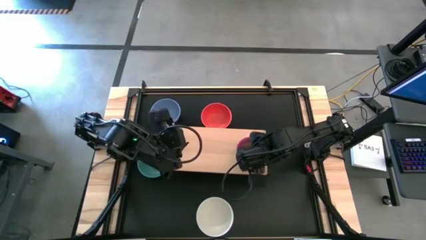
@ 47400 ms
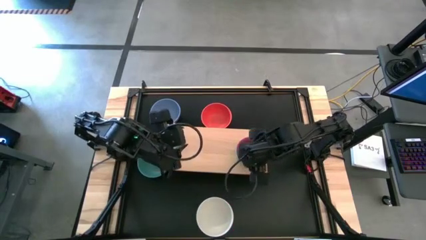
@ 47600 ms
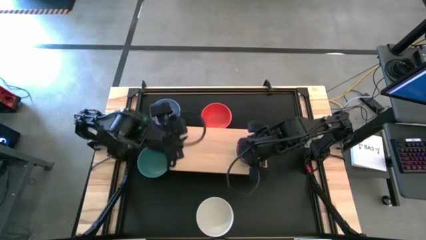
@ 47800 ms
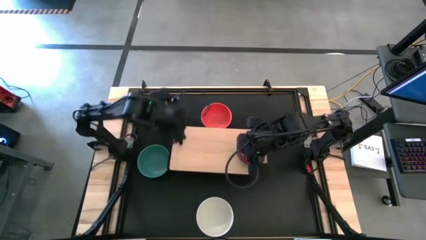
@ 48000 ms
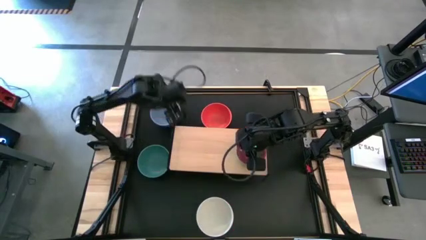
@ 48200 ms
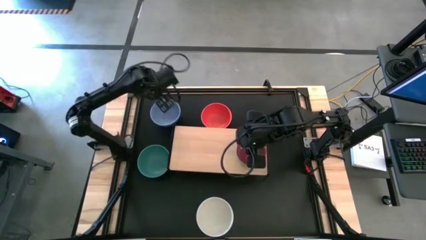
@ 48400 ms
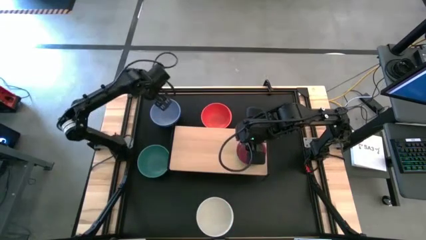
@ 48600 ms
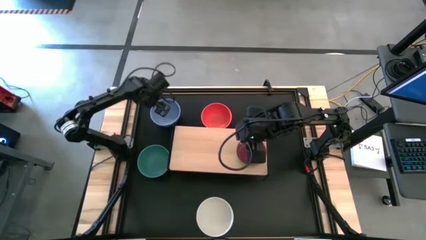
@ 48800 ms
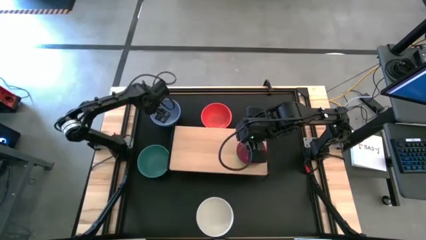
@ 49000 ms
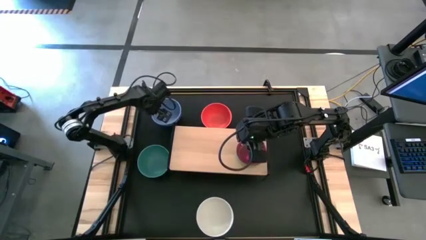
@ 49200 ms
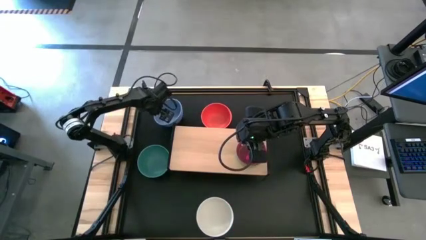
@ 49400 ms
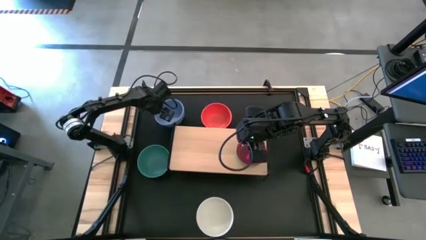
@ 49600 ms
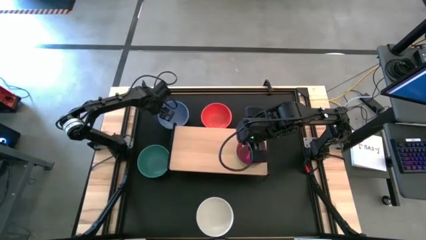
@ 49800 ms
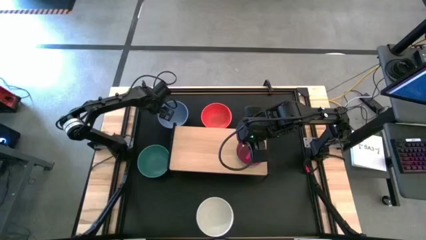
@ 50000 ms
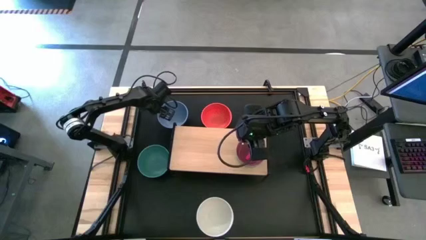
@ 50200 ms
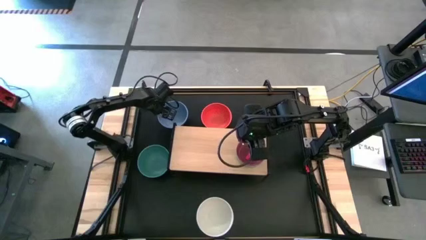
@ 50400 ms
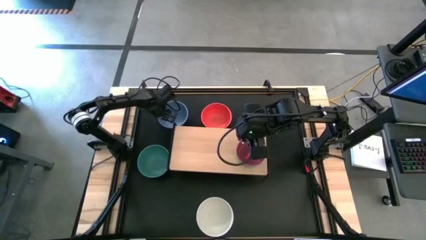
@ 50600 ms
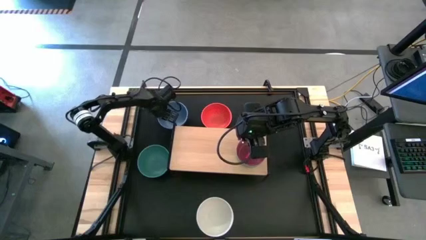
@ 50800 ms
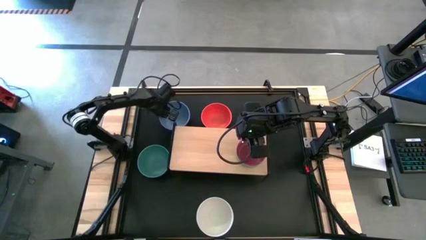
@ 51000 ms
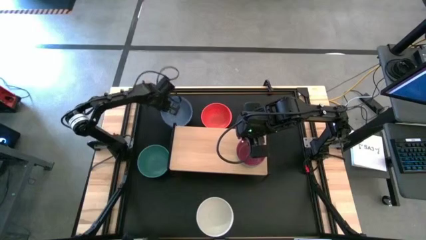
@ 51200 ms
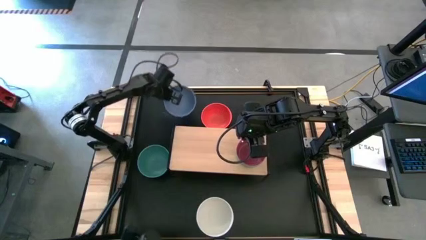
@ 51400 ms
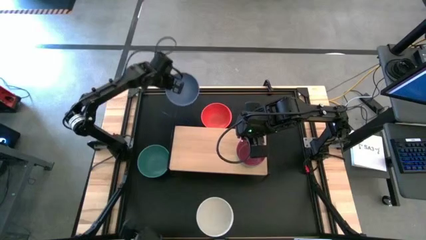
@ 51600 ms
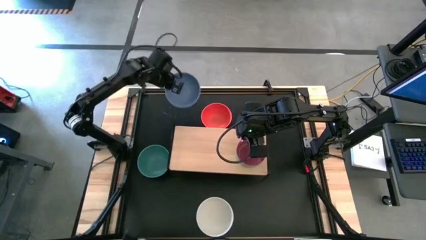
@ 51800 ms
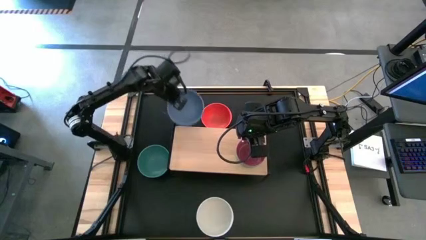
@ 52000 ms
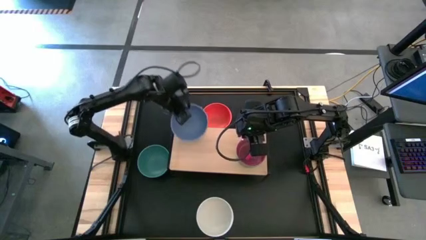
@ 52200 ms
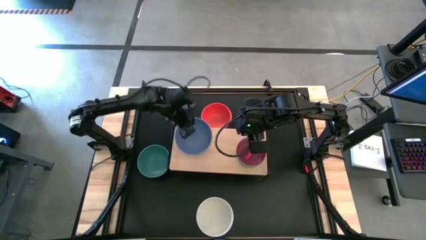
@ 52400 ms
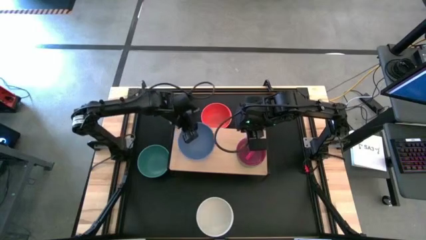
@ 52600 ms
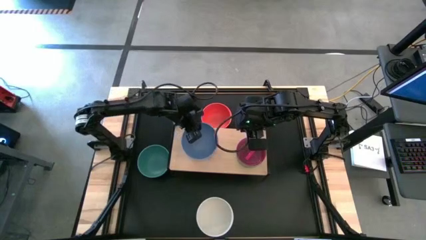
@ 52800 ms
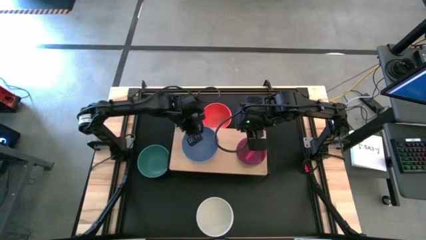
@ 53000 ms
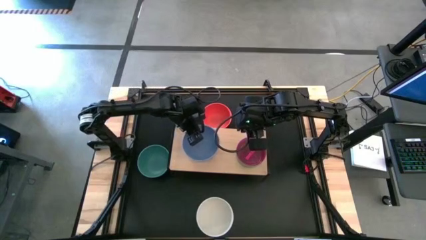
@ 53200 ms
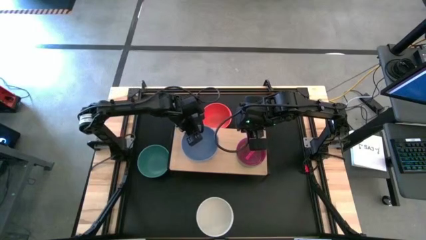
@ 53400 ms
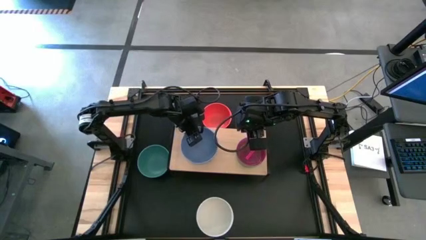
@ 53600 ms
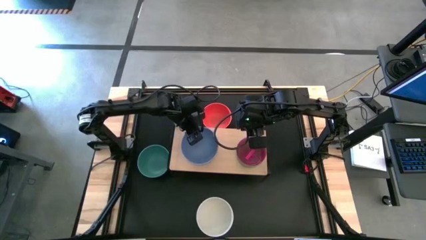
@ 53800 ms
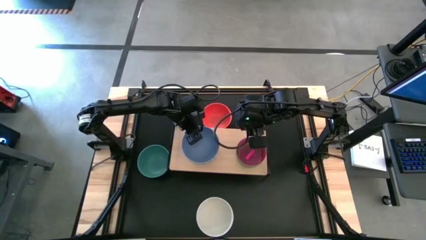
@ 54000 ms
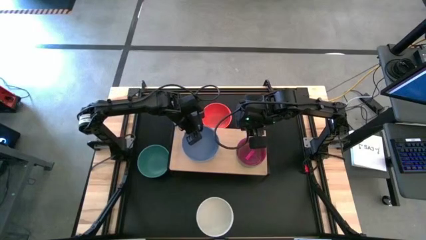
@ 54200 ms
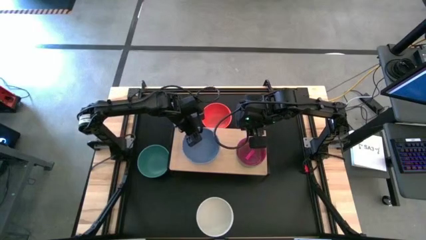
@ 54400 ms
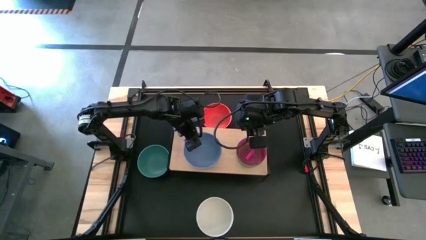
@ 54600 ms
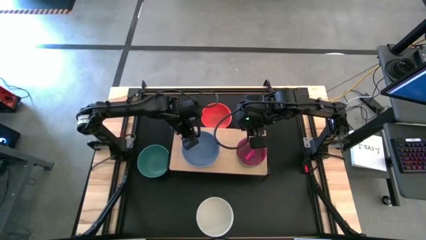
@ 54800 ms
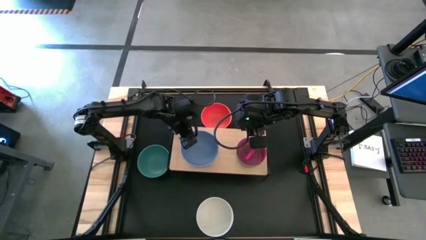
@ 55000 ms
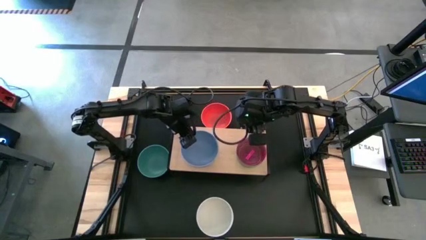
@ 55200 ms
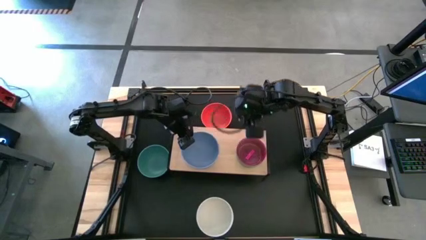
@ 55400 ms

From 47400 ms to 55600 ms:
Task: Place and stack bowls onto a shelf
Put the big blue on the of the shelf

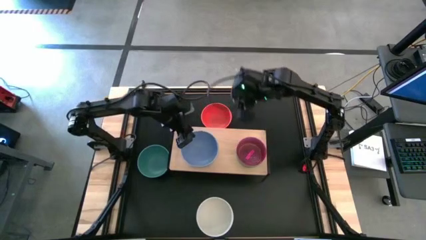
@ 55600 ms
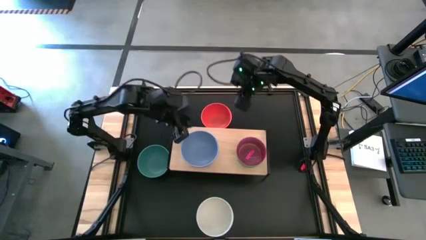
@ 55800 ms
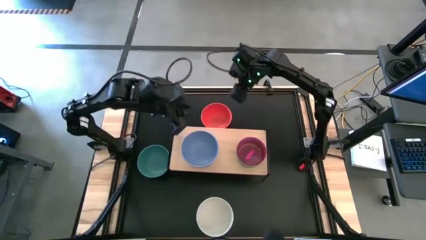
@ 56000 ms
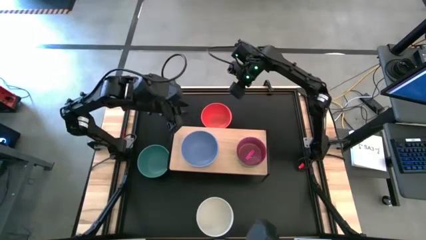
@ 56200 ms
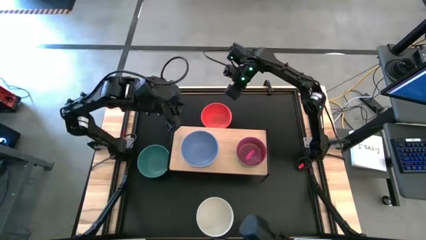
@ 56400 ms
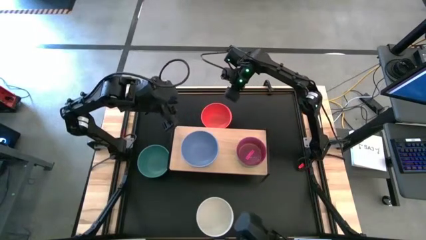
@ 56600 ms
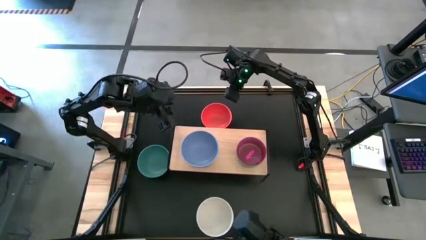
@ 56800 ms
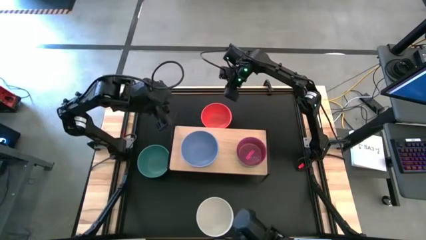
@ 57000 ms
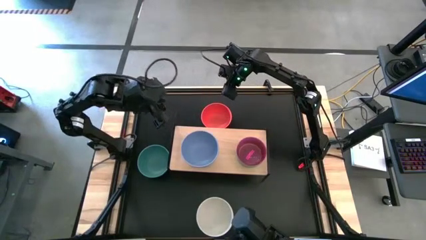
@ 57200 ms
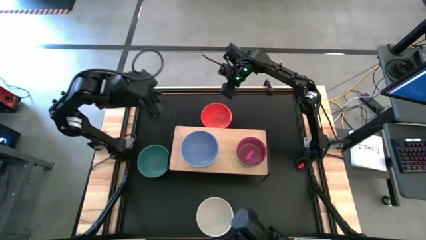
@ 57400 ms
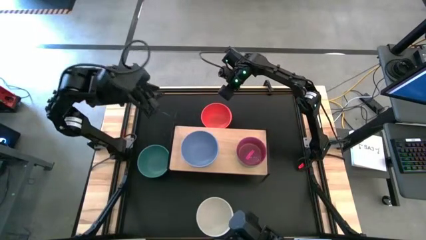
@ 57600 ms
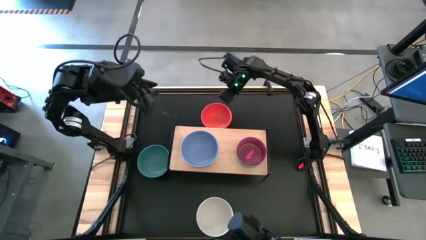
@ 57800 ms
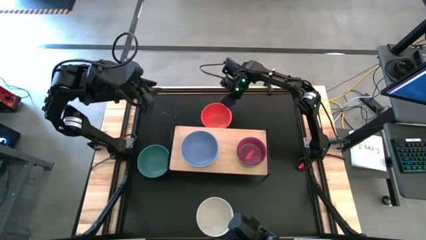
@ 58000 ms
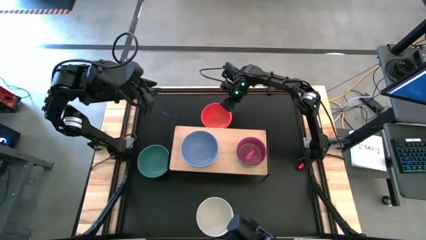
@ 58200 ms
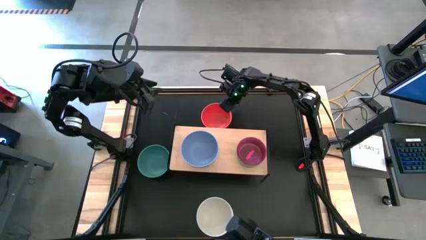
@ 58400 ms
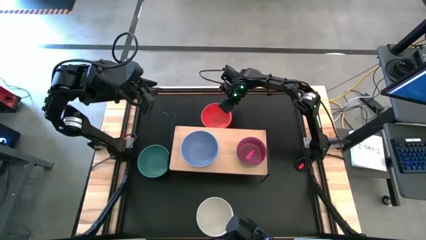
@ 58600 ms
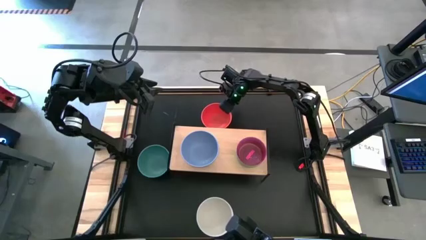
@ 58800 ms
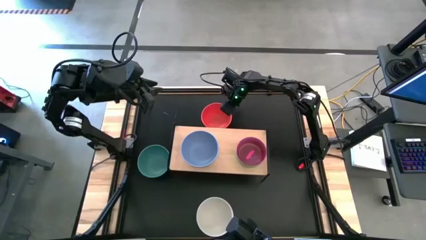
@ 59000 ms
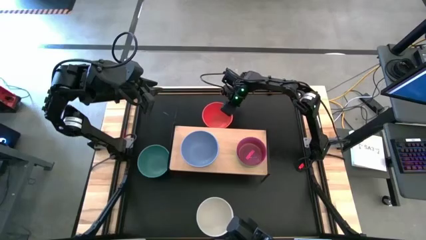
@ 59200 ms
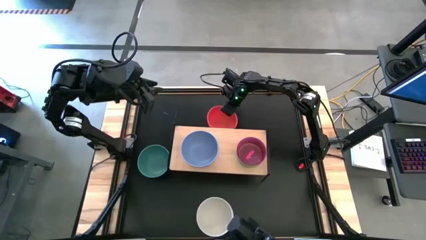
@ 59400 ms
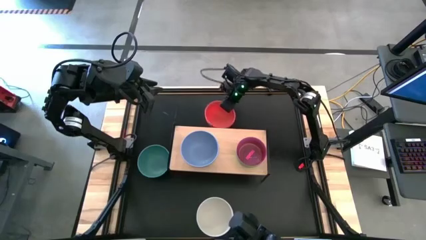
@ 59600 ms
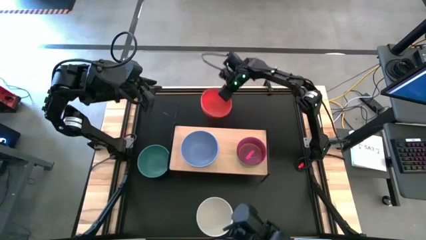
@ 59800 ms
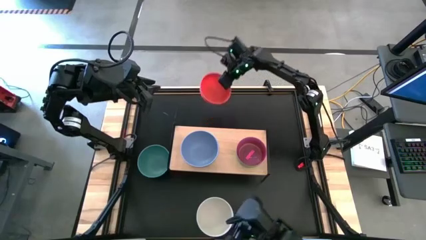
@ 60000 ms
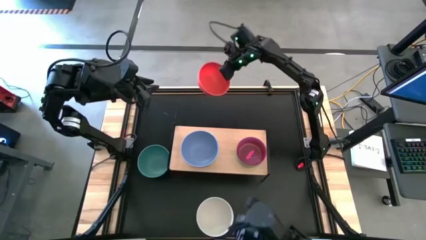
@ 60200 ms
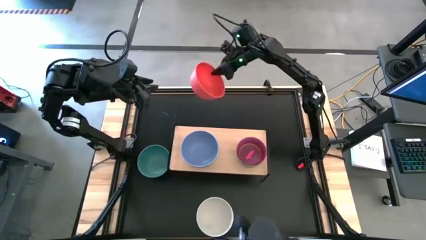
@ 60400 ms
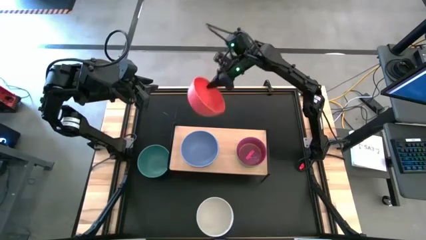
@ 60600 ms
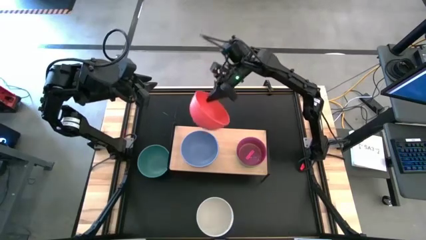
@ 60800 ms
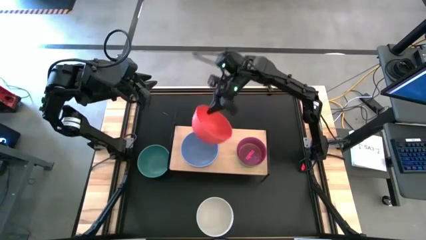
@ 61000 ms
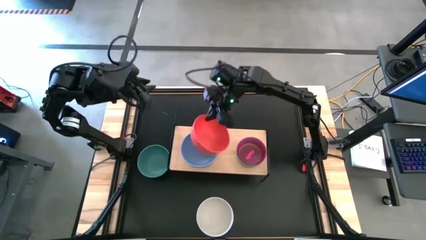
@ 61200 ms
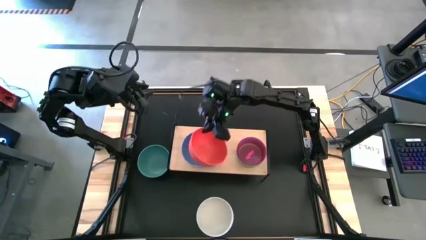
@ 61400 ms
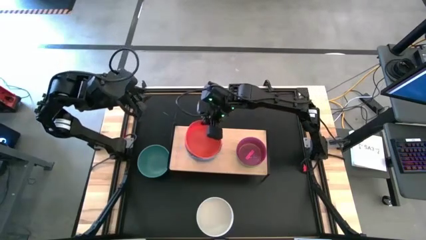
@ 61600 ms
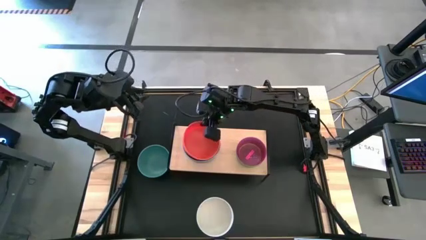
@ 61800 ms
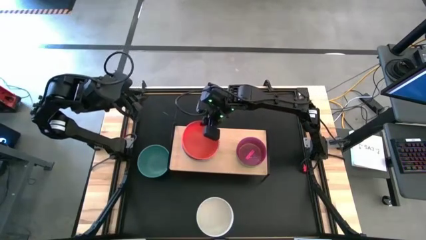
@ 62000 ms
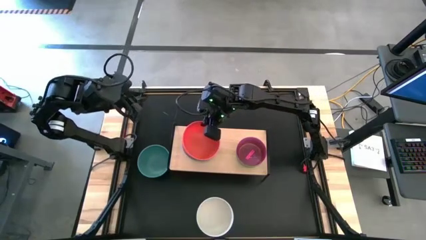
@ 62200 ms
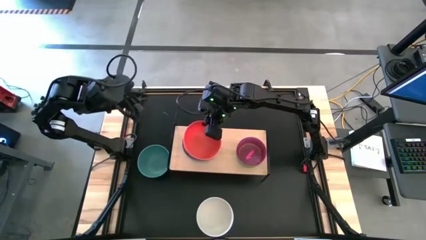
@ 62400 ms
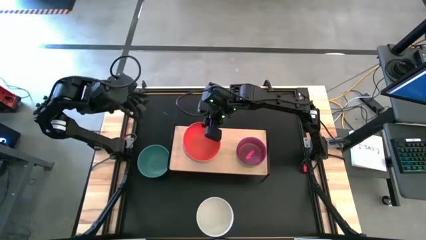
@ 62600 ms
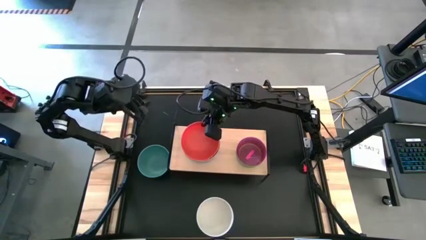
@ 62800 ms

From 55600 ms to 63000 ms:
Stack the big orange bowl on top of the big blue bowl on the shelf
